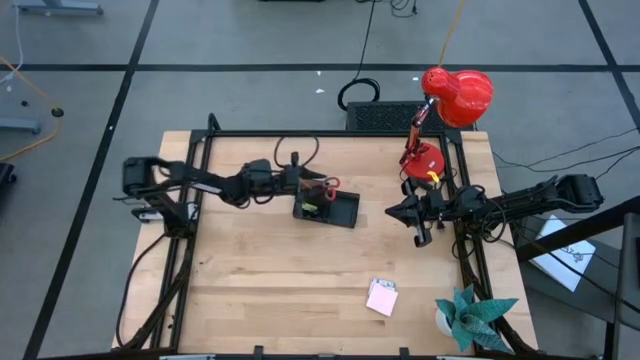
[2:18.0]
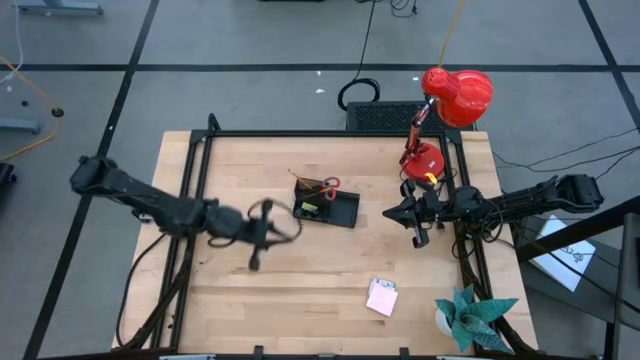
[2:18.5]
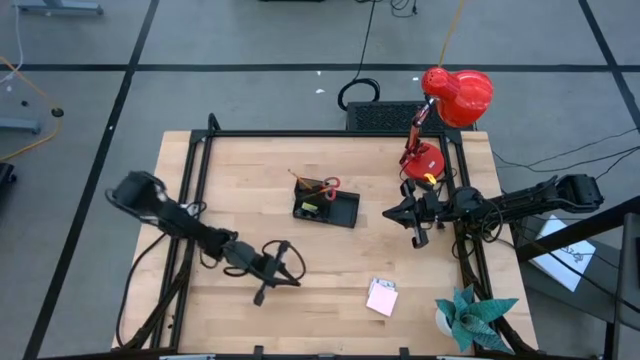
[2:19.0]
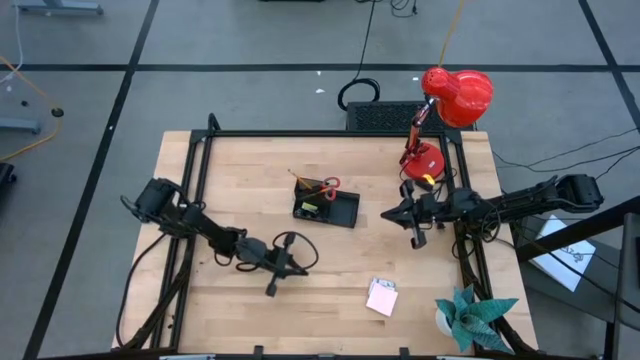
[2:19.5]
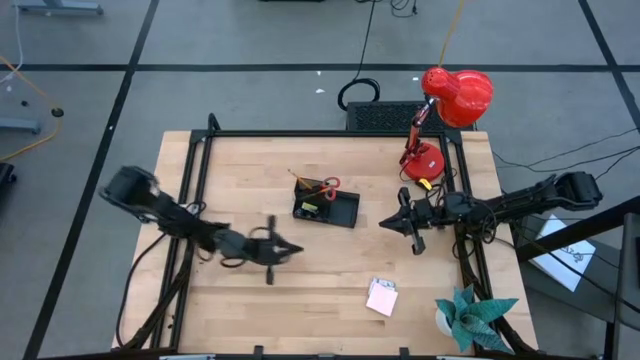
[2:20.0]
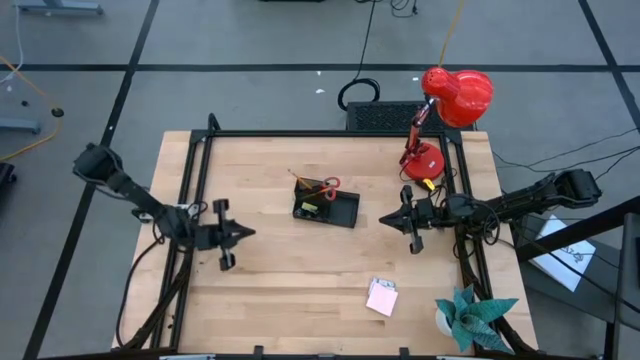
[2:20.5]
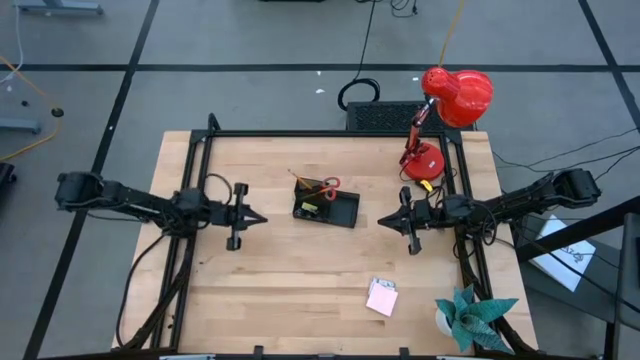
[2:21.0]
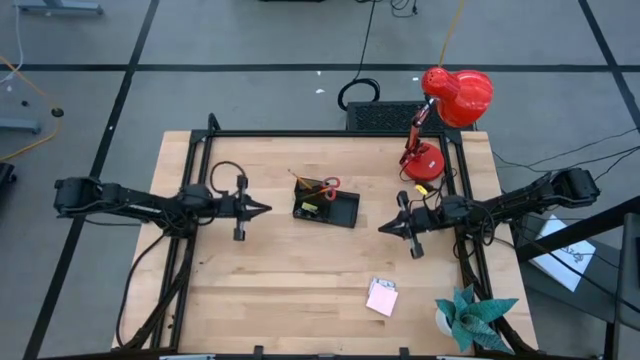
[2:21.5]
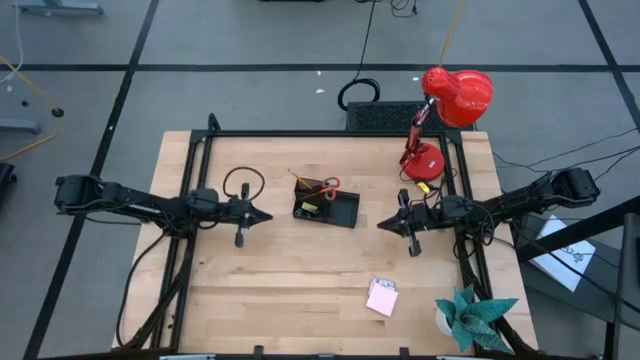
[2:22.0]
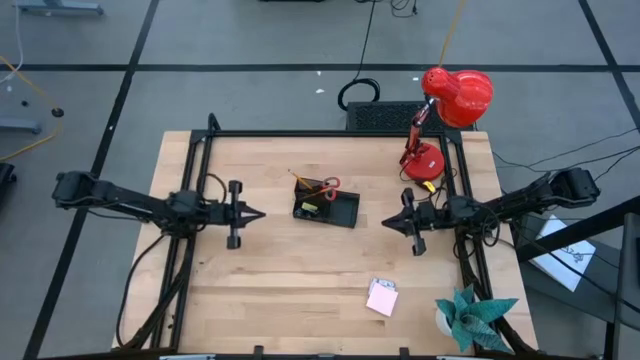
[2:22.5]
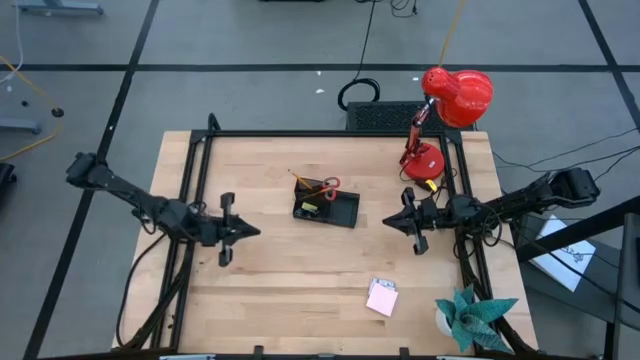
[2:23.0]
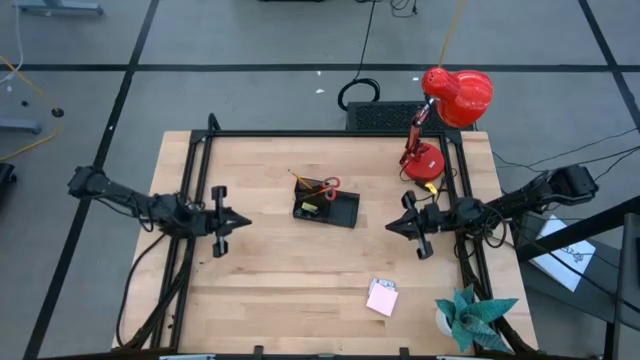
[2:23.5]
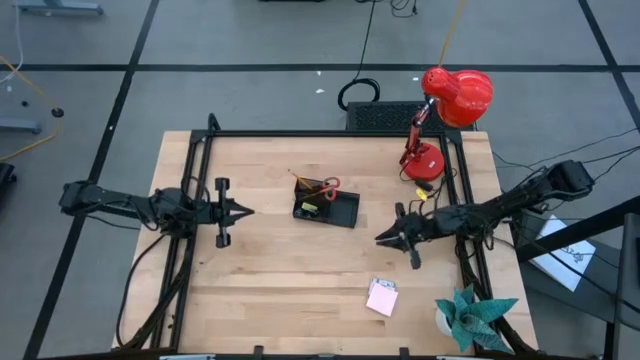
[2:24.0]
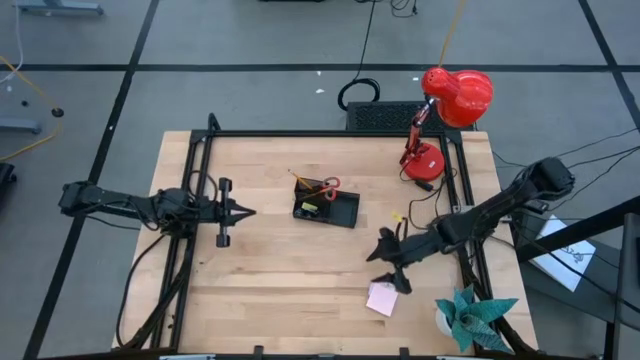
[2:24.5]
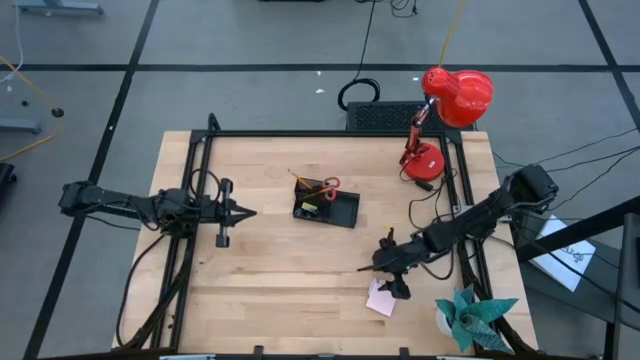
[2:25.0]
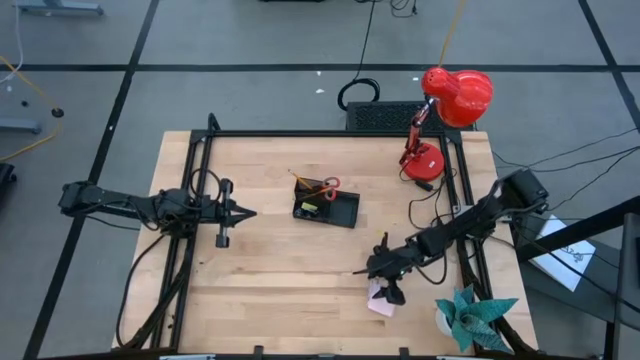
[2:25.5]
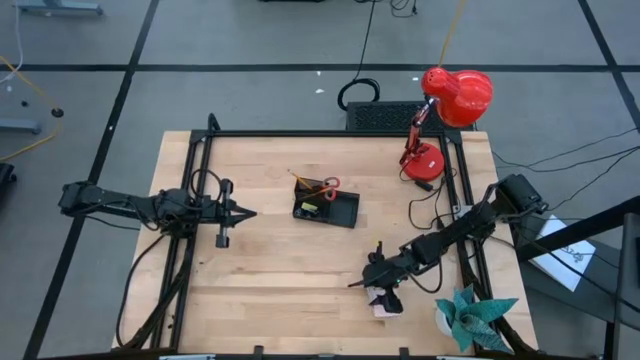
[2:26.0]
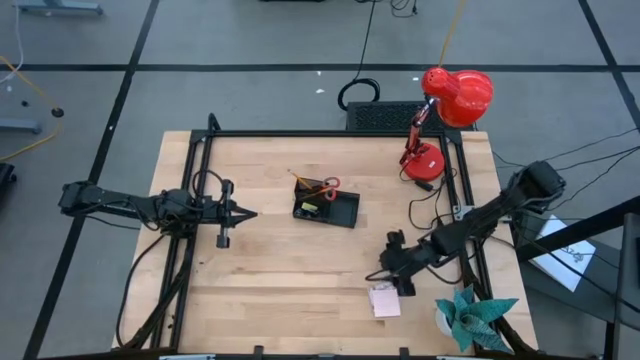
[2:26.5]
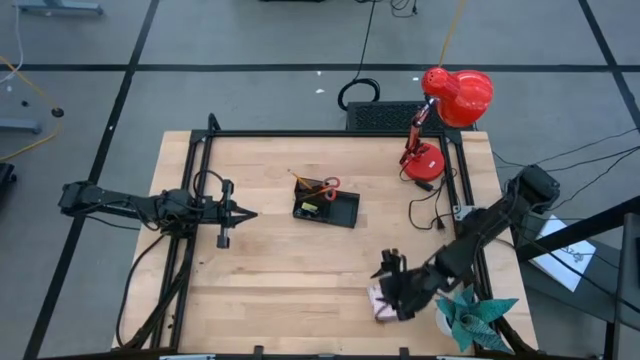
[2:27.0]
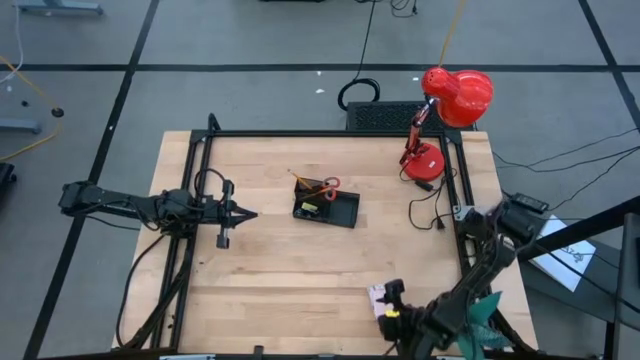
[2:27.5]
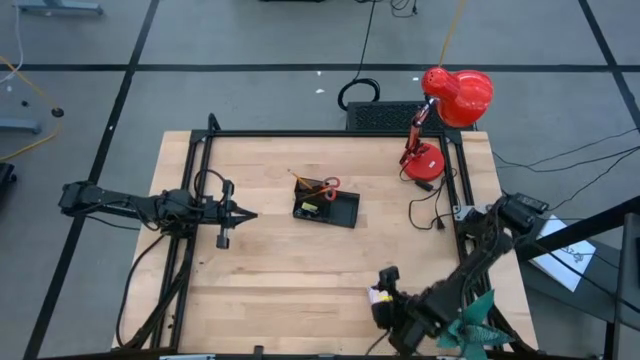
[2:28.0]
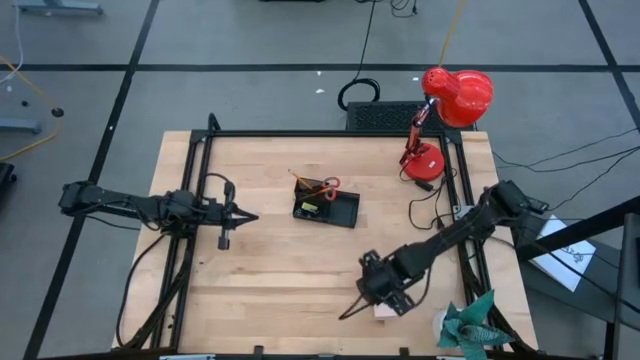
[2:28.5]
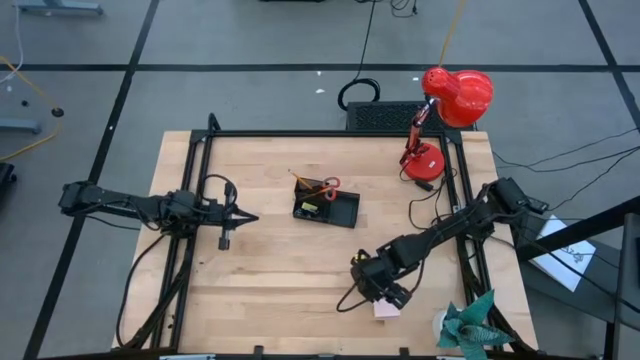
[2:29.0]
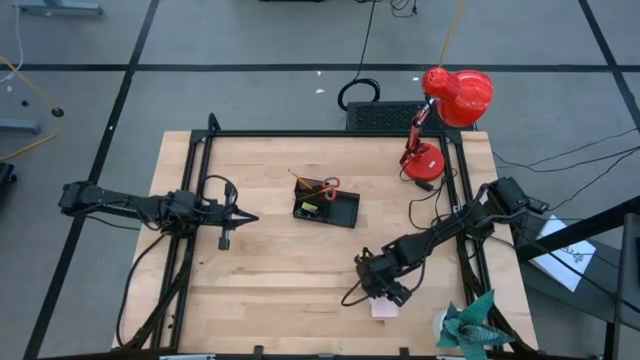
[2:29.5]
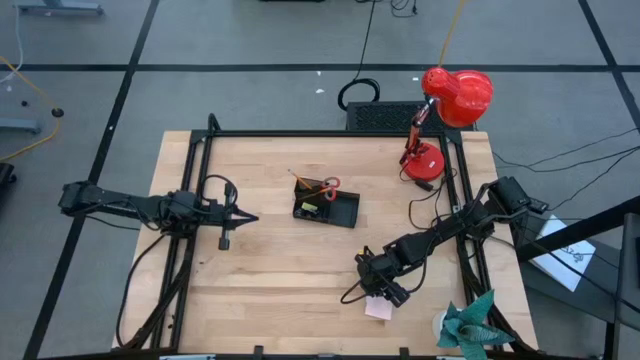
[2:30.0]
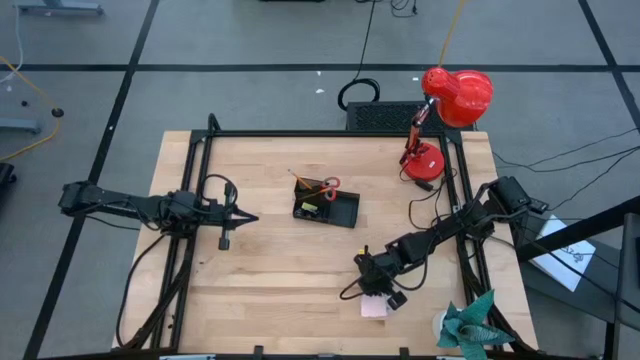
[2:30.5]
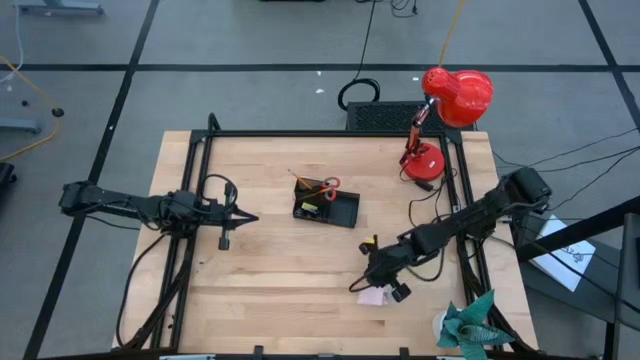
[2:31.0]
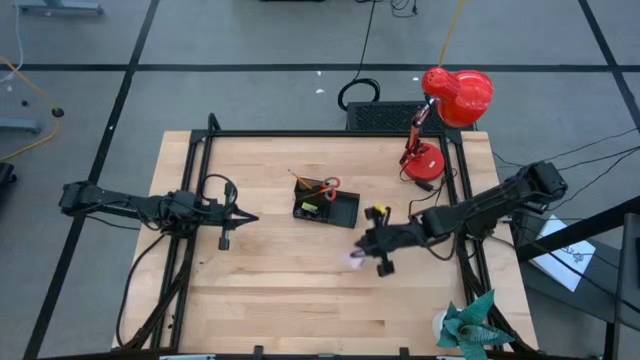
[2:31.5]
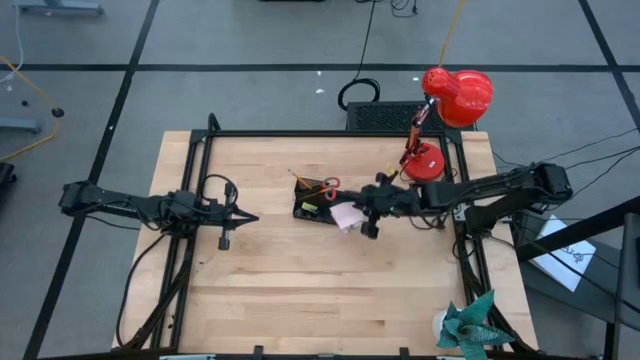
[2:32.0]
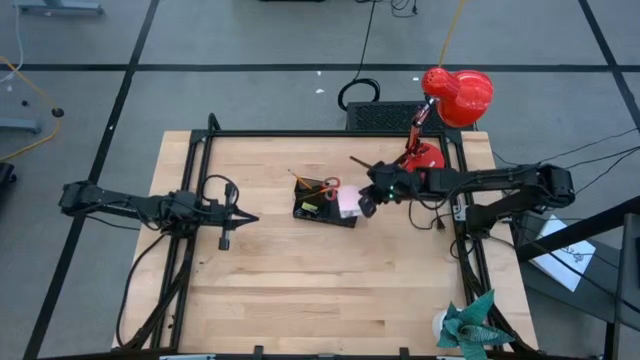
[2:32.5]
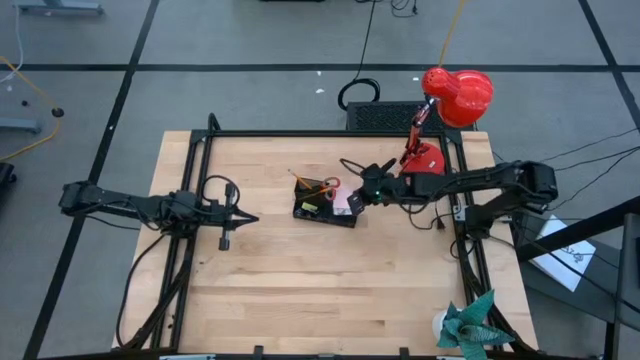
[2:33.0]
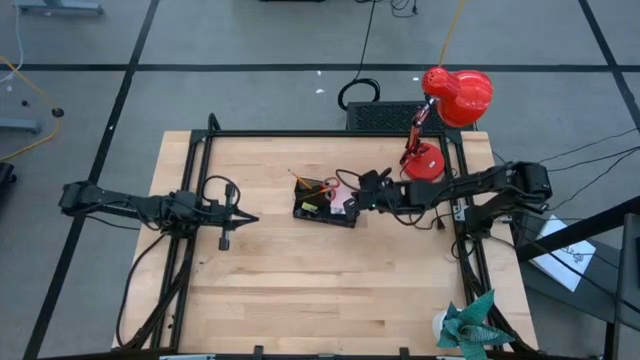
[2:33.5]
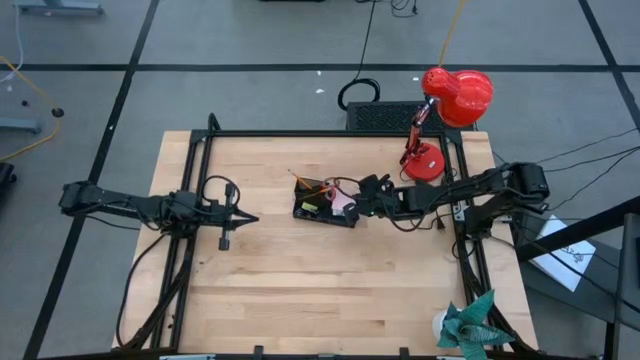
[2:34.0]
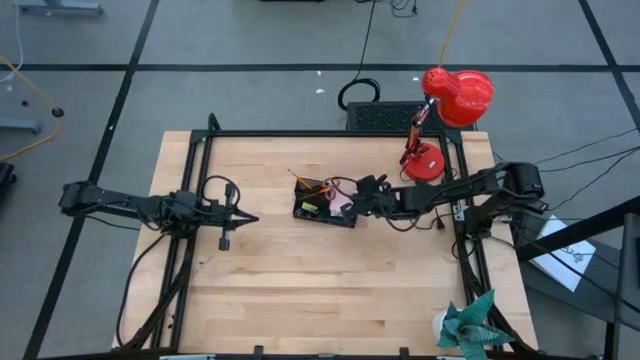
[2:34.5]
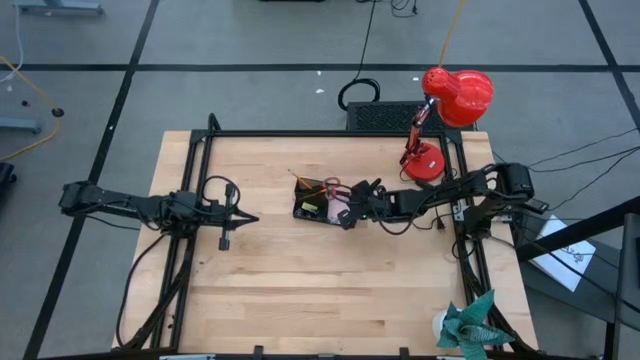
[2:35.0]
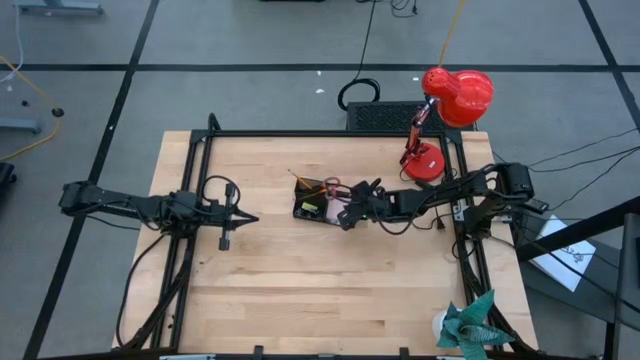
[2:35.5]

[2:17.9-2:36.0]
Task: Pick and place office supplies into organizer
Put the sticky note into the desk organizer

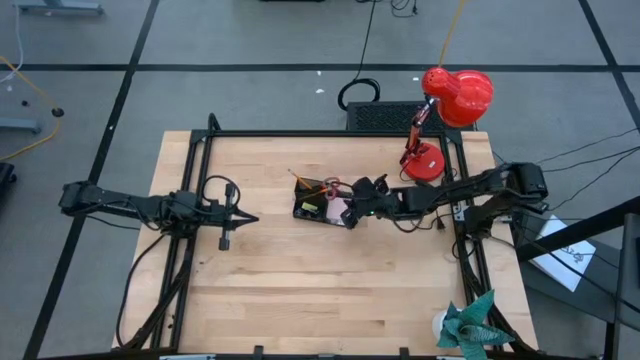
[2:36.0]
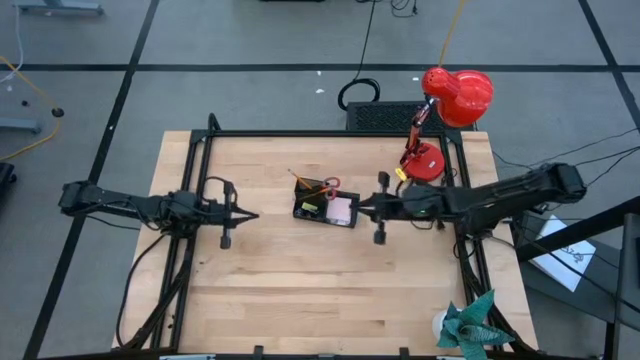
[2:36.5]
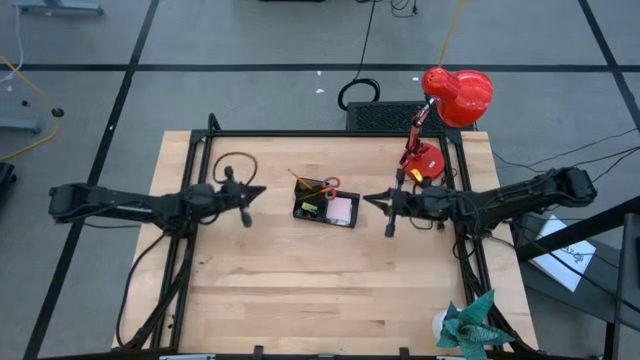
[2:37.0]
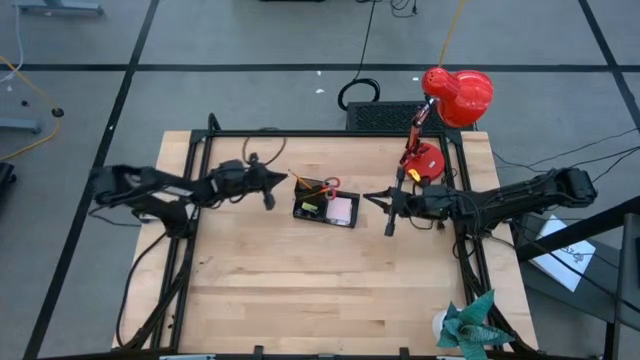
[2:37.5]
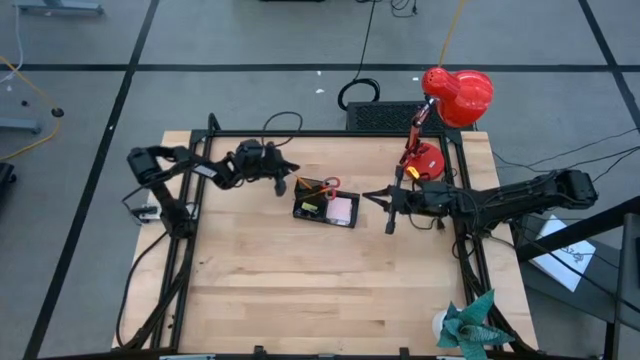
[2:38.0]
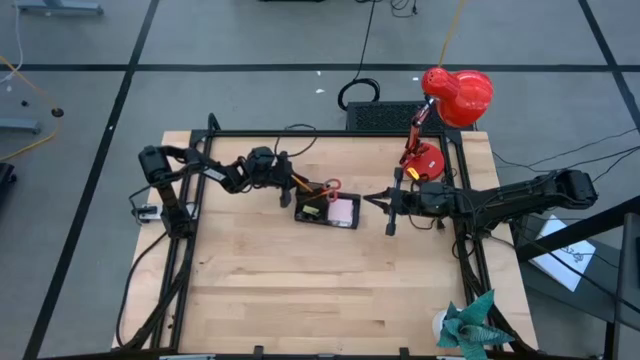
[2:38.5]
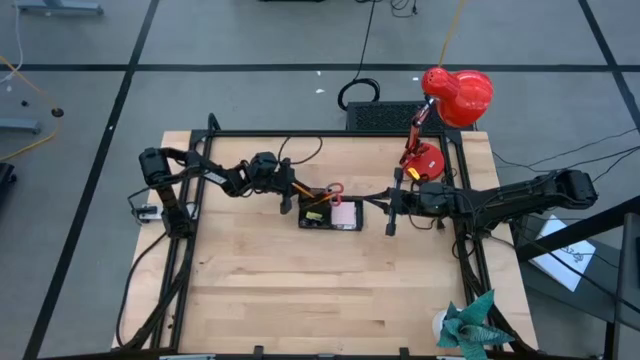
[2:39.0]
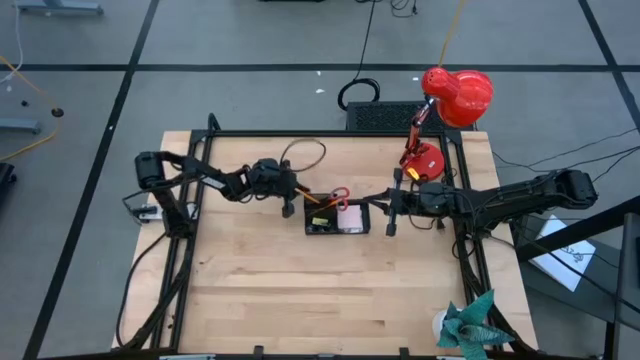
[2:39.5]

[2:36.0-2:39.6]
Adjust the desk organizer
